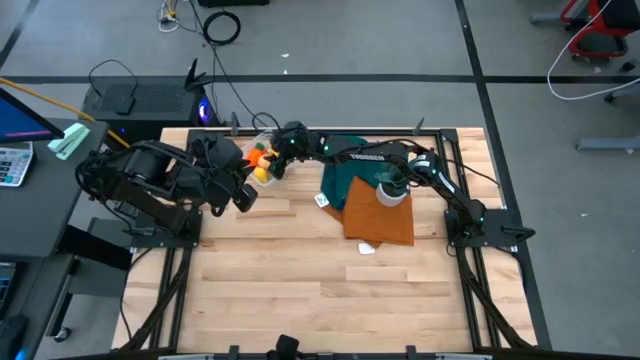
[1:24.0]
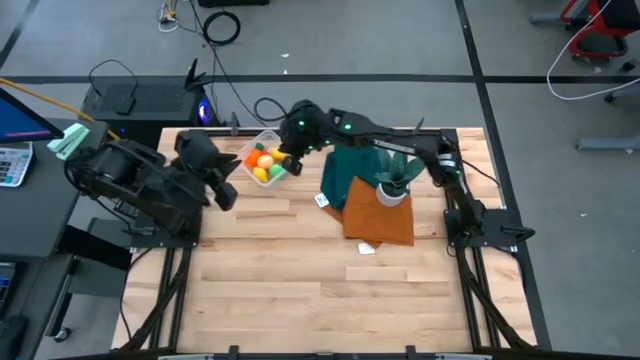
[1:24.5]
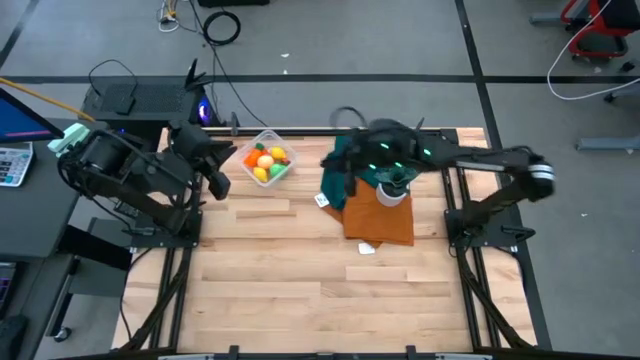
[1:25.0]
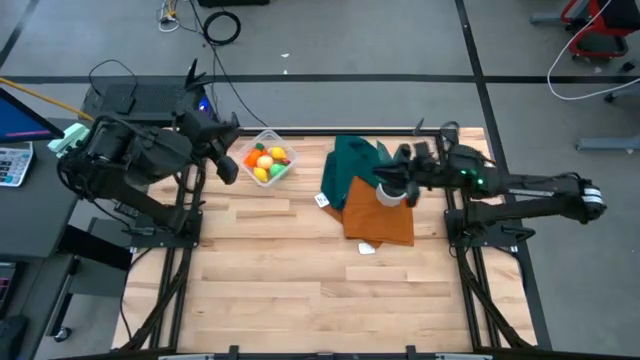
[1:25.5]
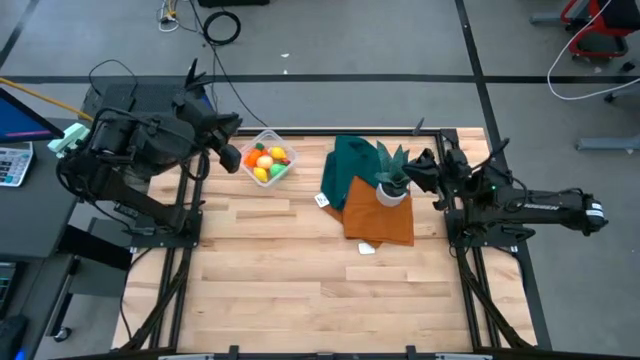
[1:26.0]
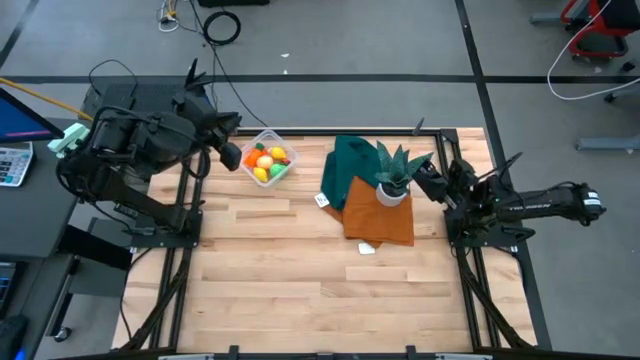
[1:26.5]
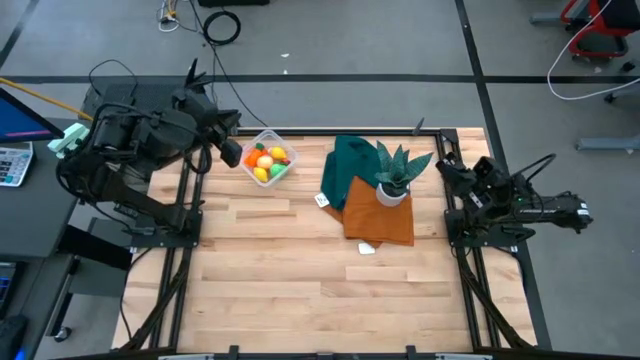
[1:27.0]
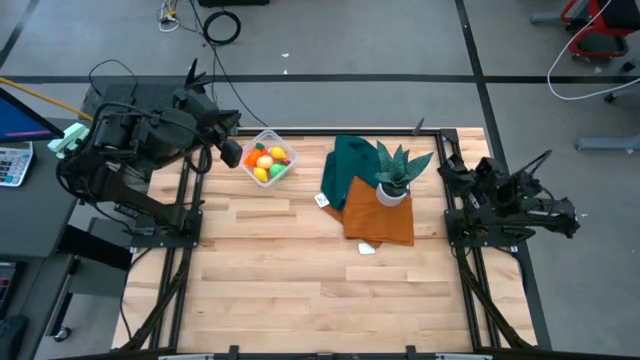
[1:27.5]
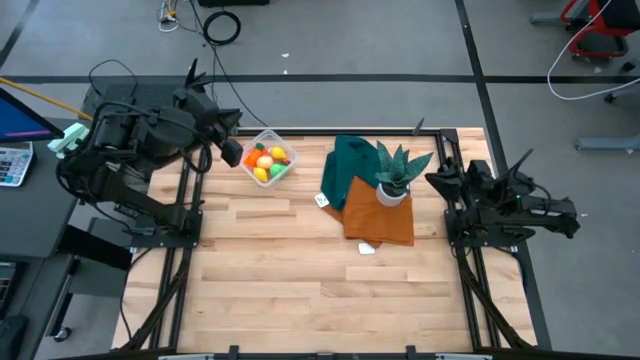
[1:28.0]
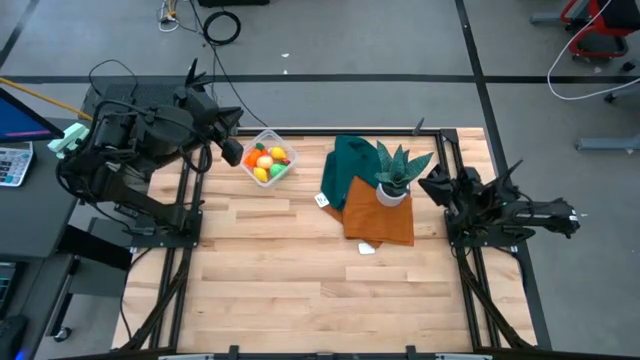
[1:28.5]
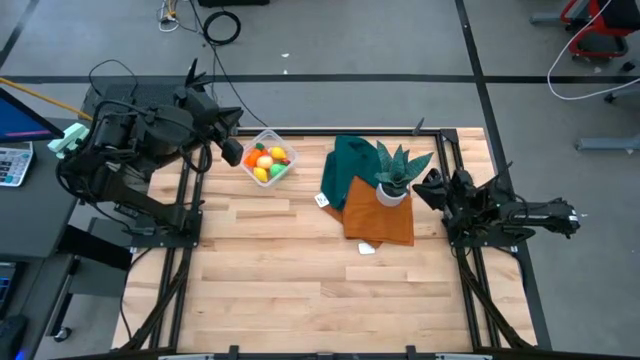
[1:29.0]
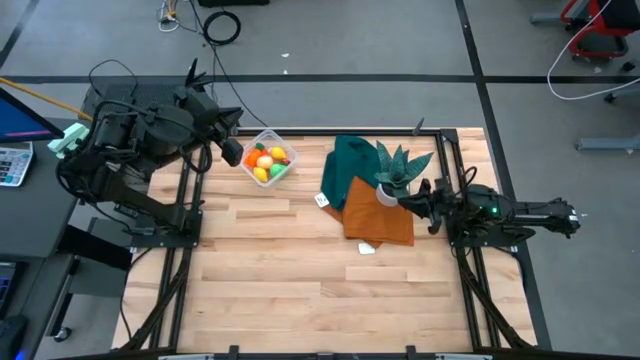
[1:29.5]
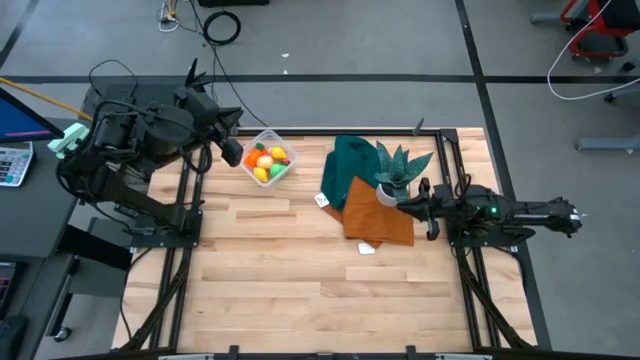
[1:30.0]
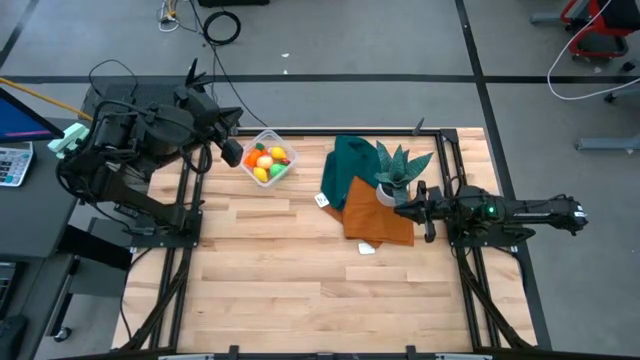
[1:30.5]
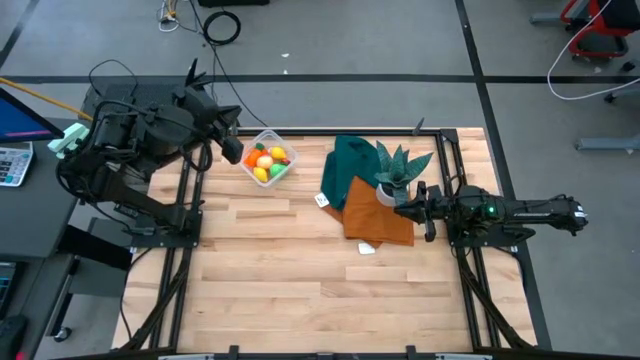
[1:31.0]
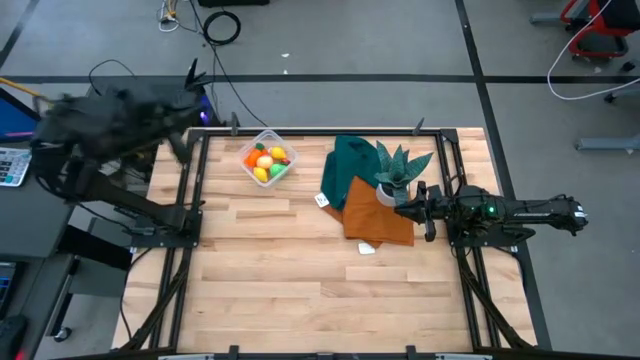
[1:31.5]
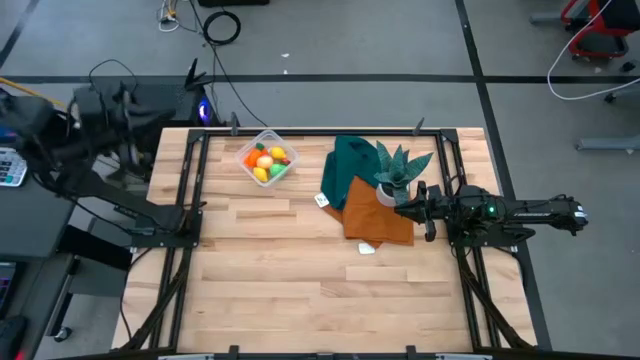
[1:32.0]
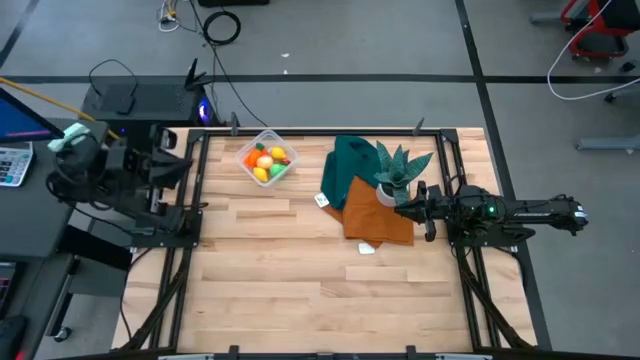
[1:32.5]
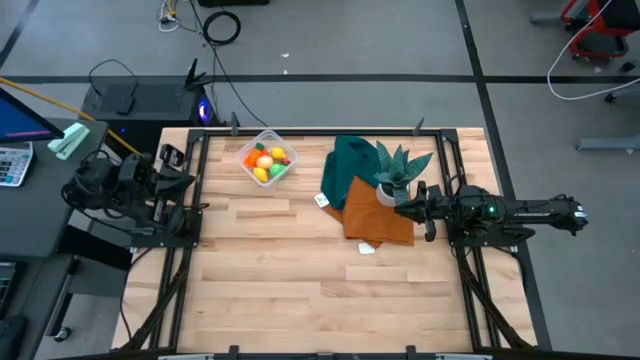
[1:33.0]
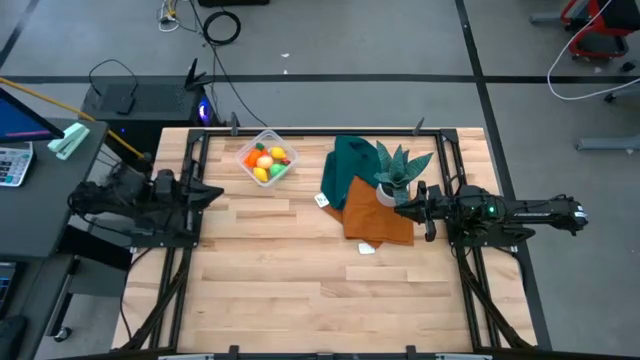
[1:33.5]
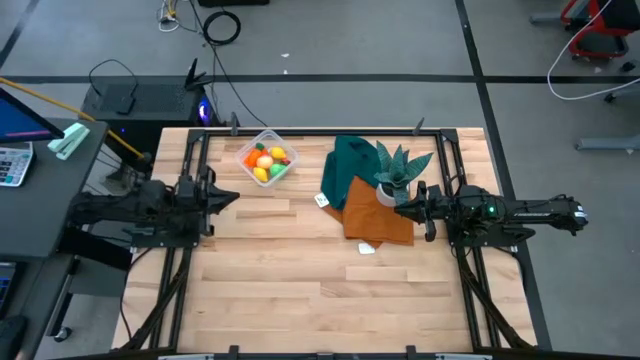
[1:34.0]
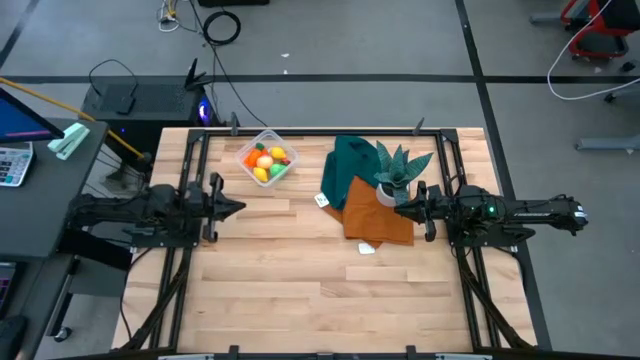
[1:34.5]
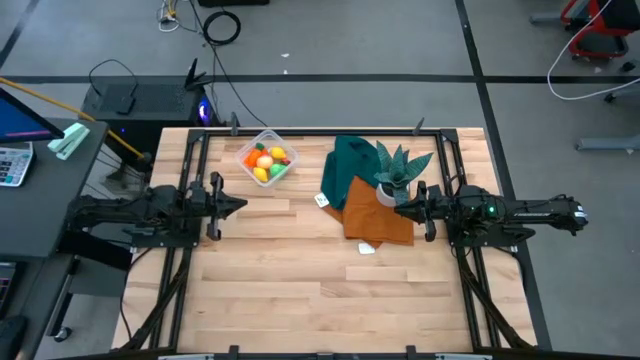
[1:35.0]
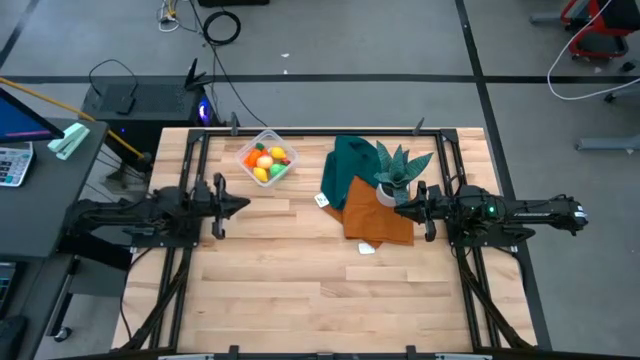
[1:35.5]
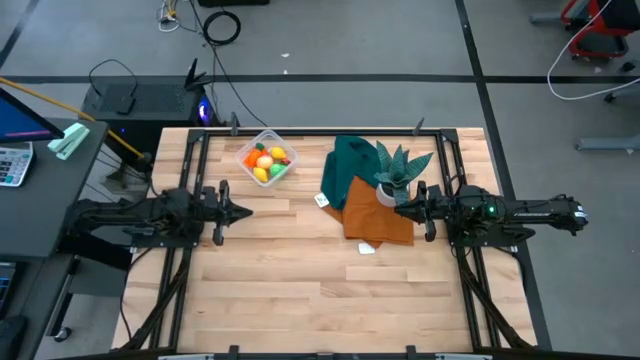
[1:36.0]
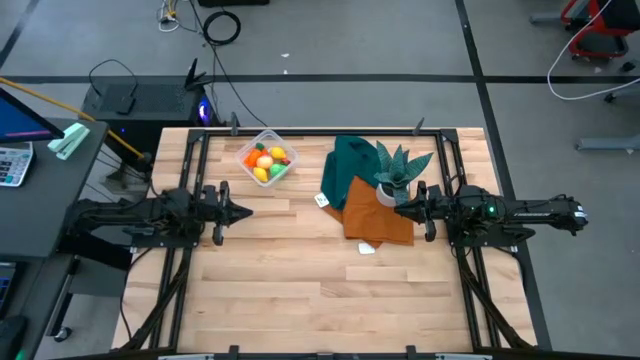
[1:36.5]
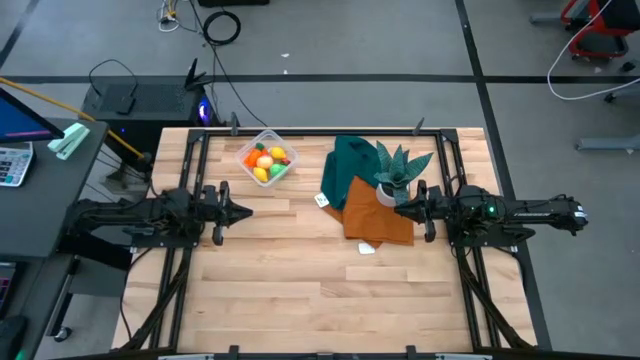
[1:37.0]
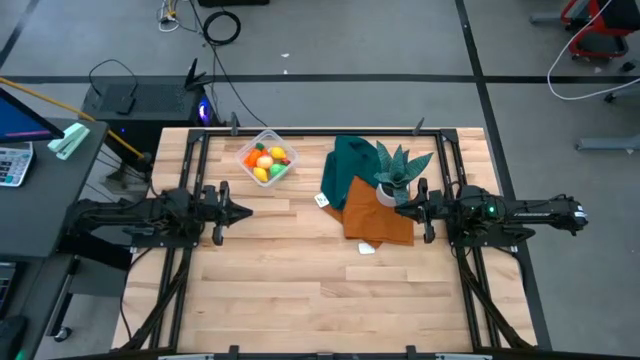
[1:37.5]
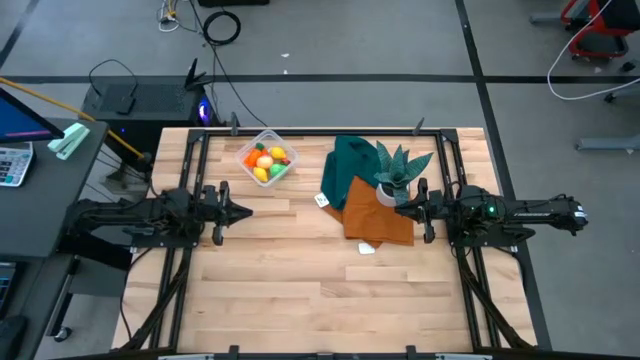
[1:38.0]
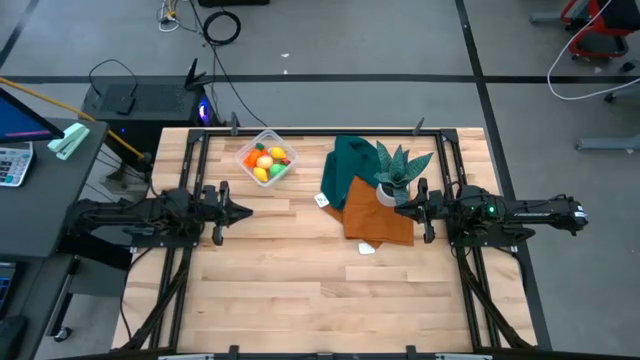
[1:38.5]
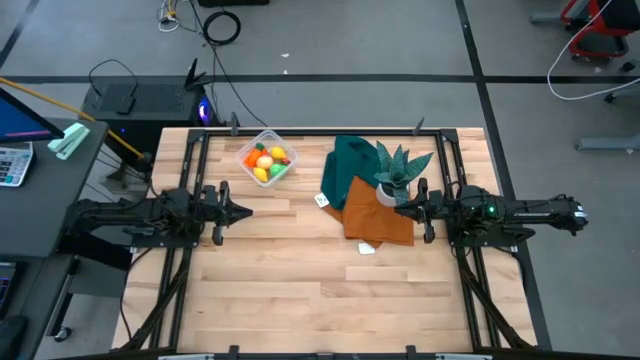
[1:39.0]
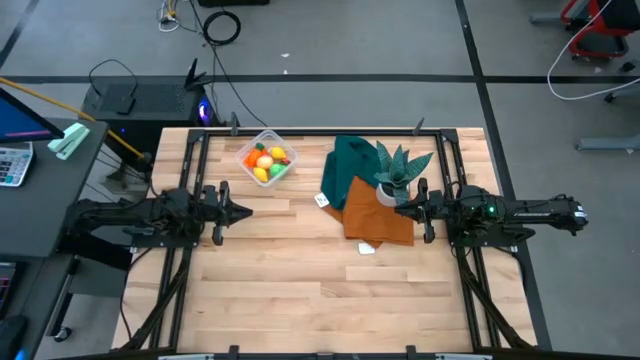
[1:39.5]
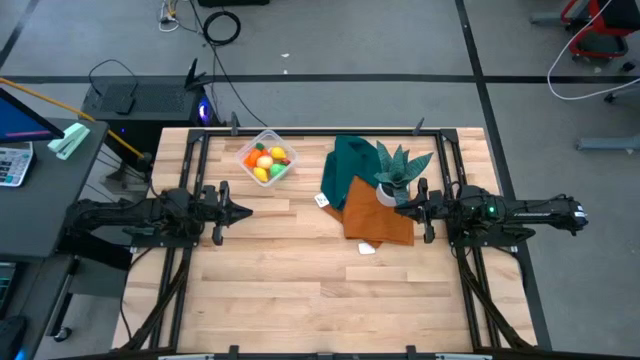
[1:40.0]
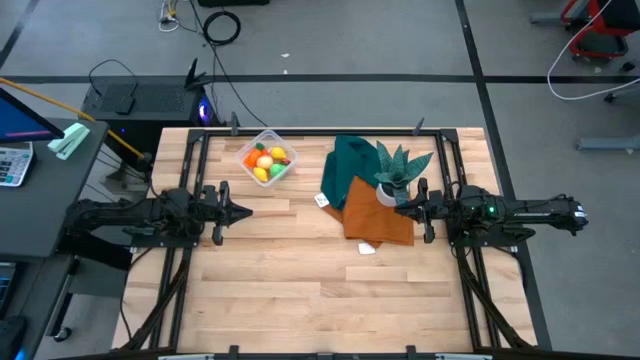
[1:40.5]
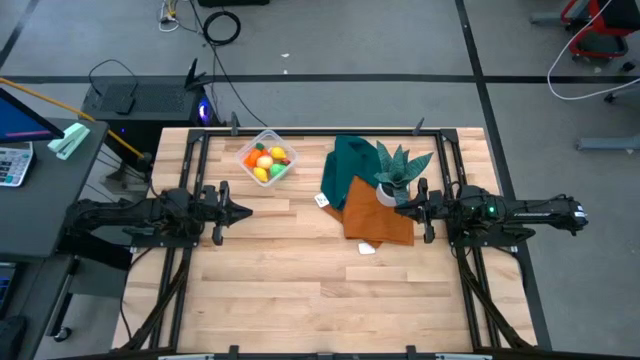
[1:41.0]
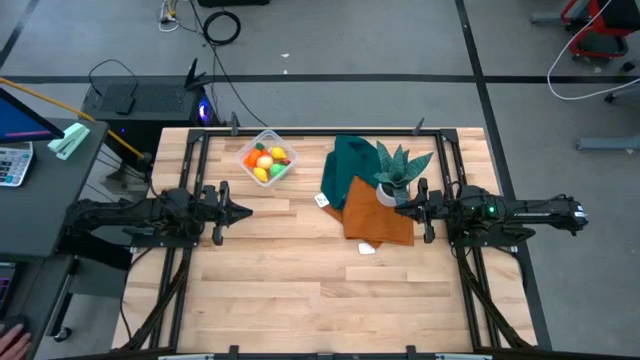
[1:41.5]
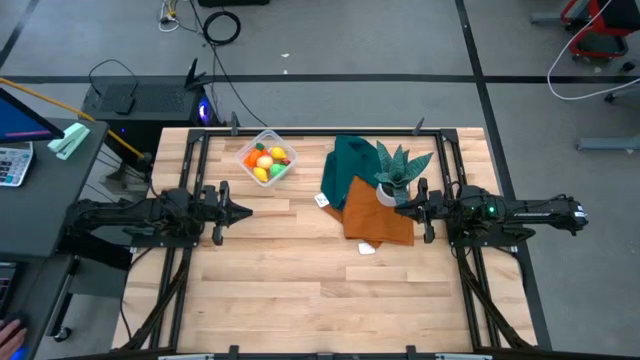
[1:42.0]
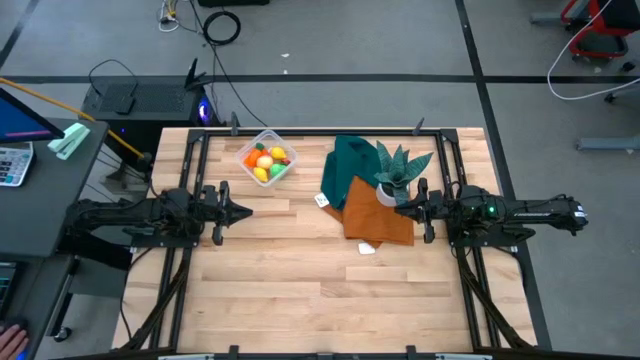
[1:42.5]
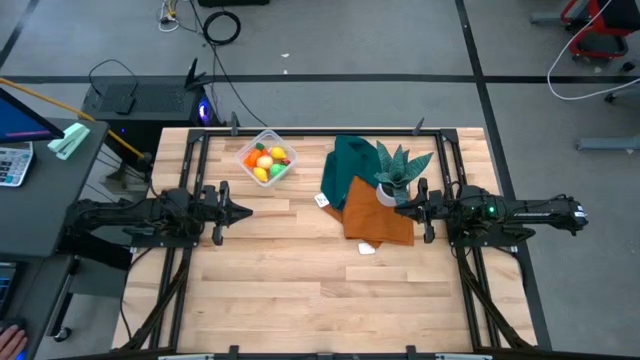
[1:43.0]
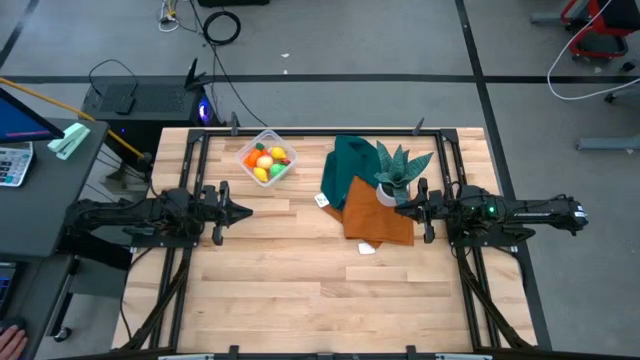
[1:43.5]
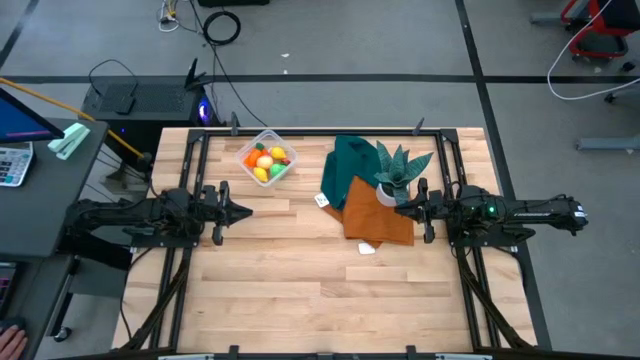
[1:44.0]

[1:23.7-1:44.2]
Task: Pick and placing Produce into tupperware
Return to Home Position

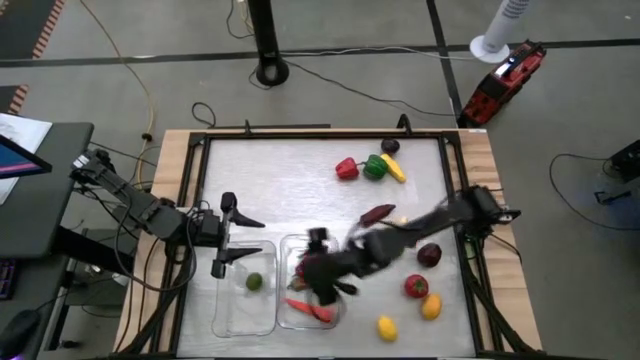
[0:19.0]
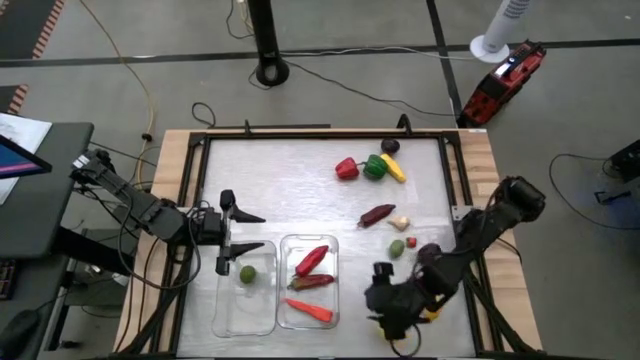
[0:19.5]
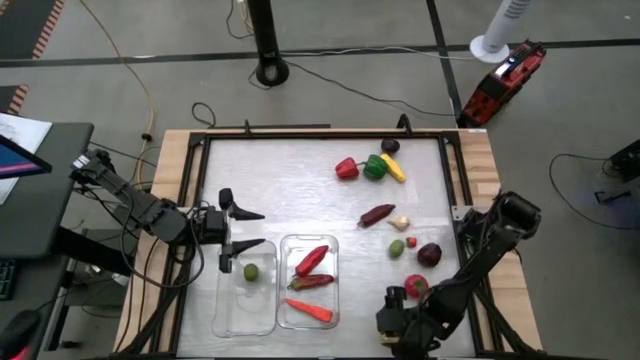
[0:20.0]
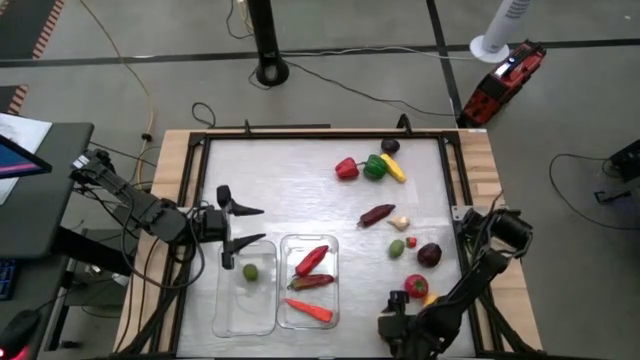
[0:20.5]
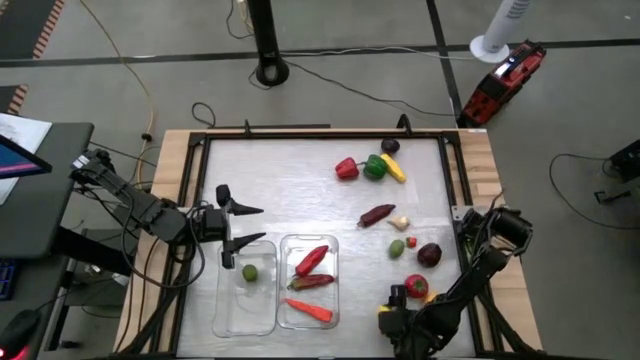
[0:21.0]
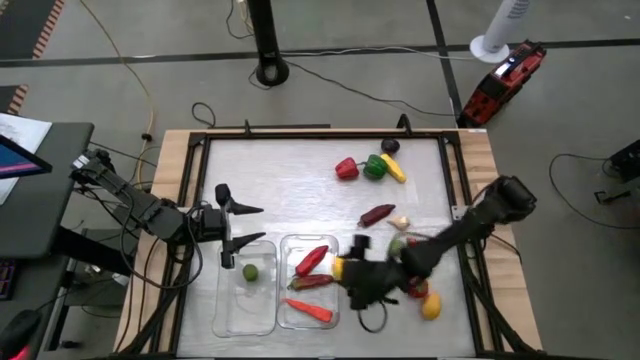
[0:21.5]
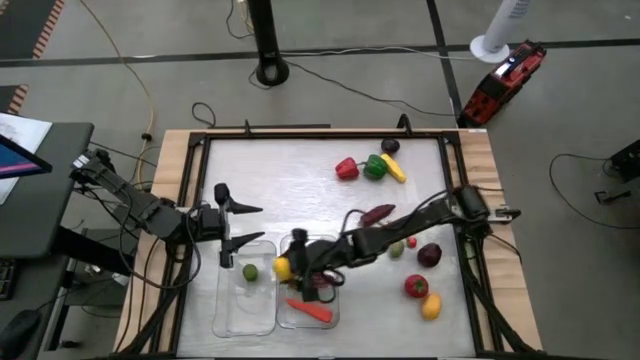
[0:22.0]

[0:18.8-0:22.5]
Task: Sort produce into baskets
Put the left yellow lemon into the left transparent bin
